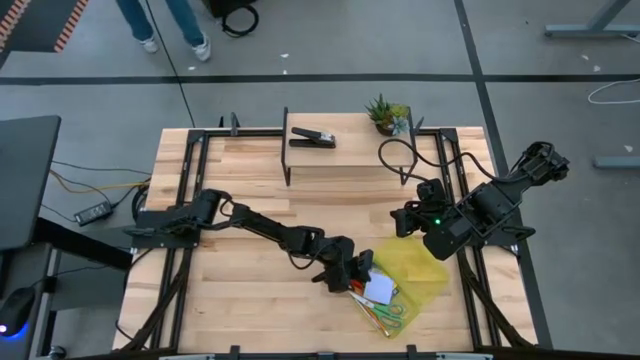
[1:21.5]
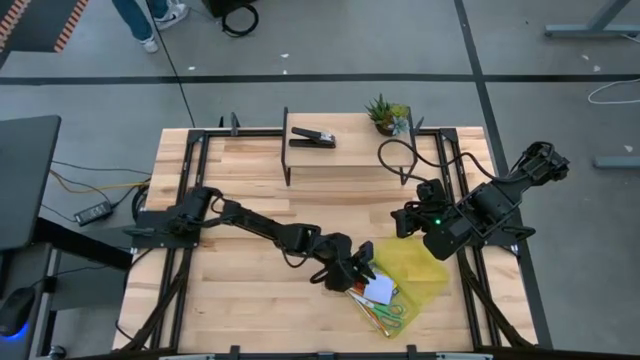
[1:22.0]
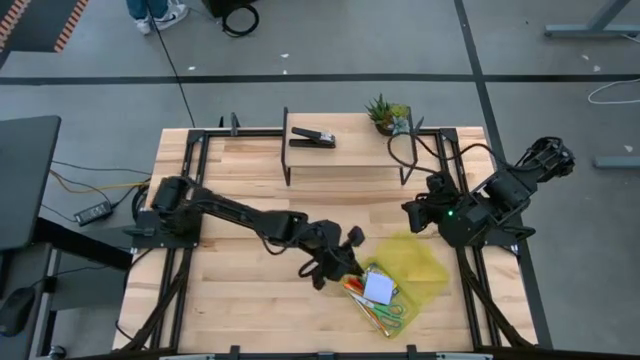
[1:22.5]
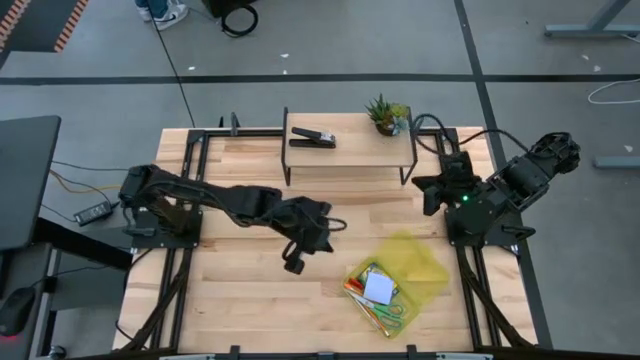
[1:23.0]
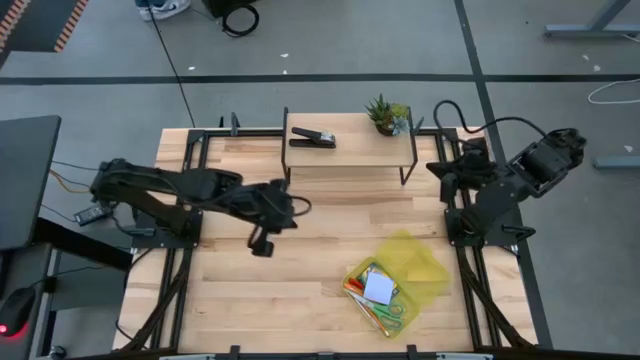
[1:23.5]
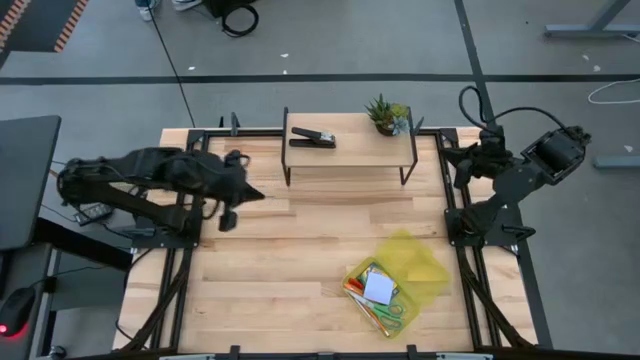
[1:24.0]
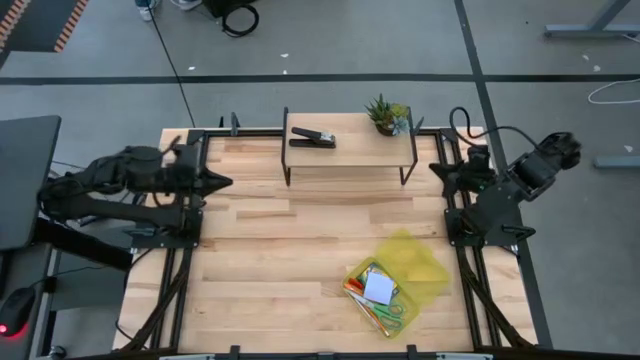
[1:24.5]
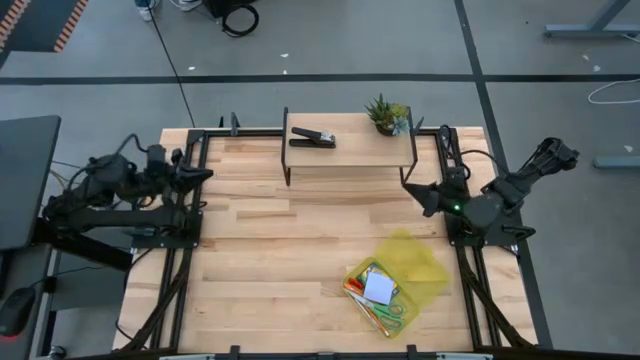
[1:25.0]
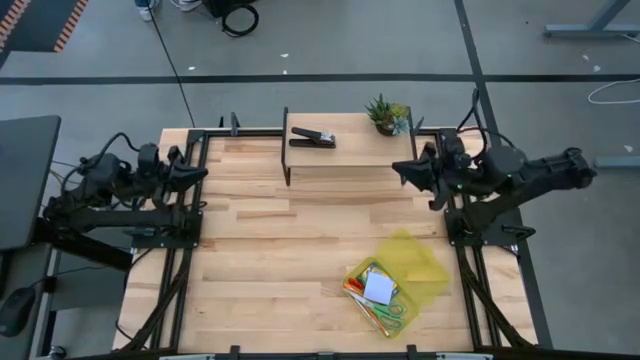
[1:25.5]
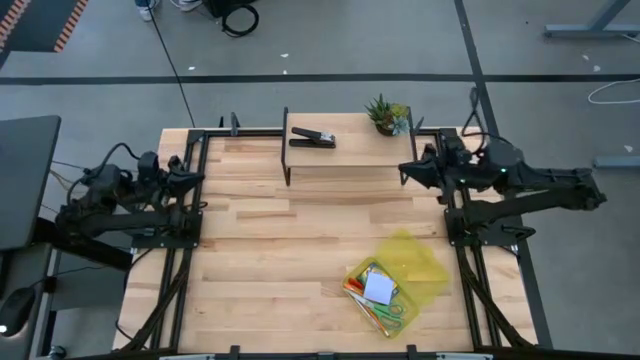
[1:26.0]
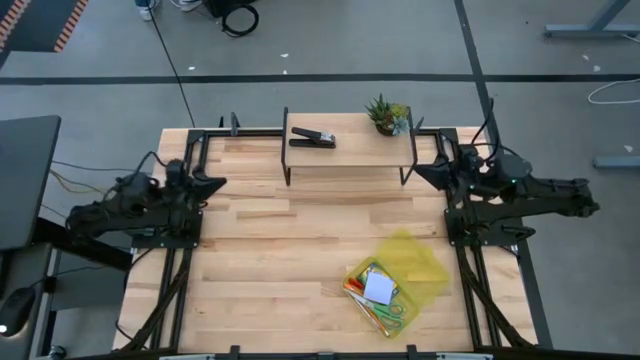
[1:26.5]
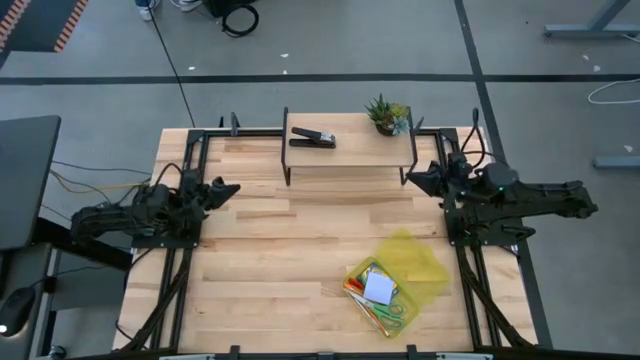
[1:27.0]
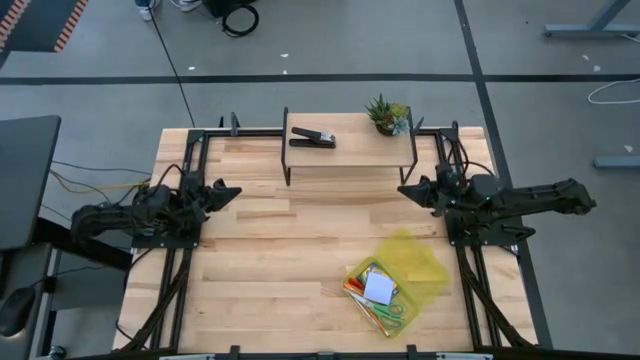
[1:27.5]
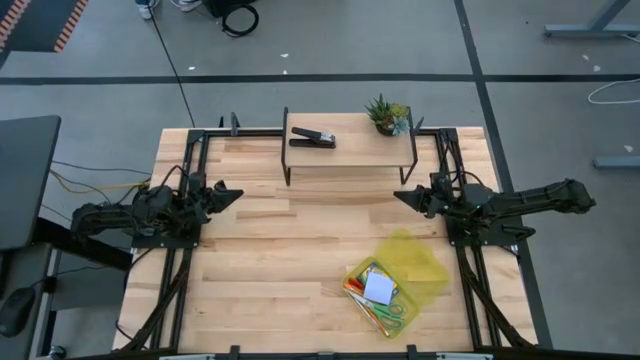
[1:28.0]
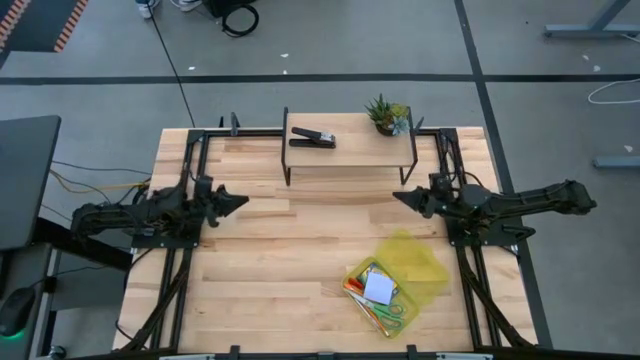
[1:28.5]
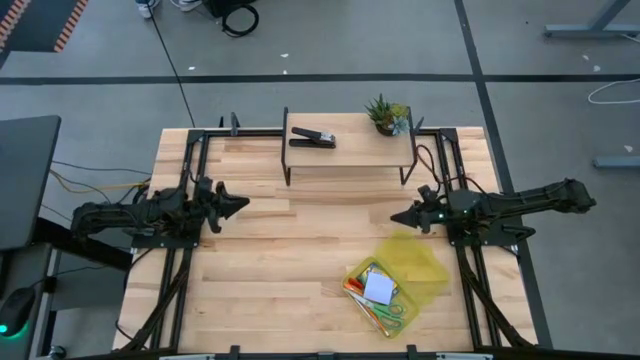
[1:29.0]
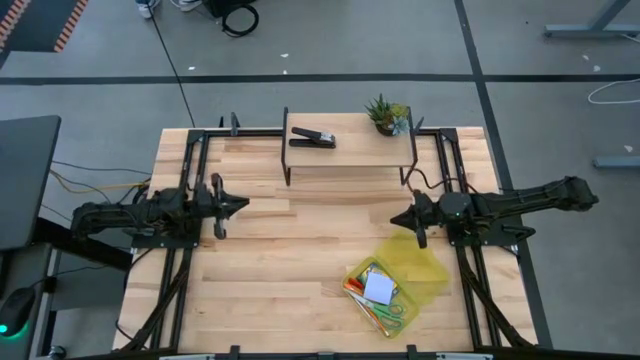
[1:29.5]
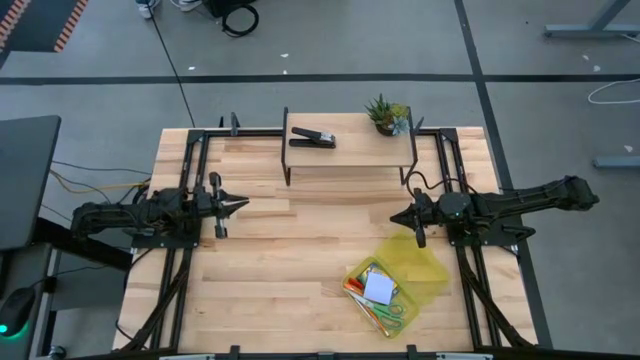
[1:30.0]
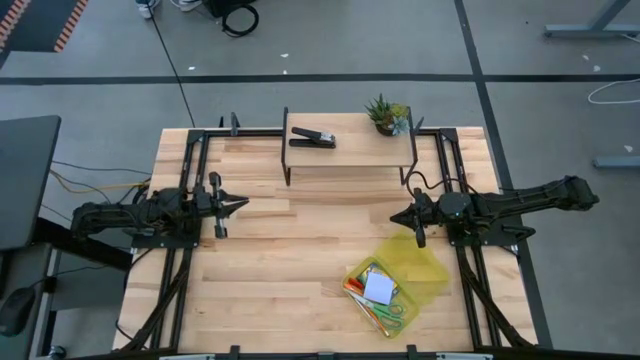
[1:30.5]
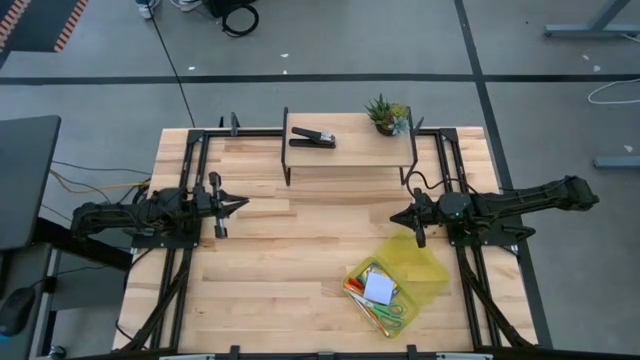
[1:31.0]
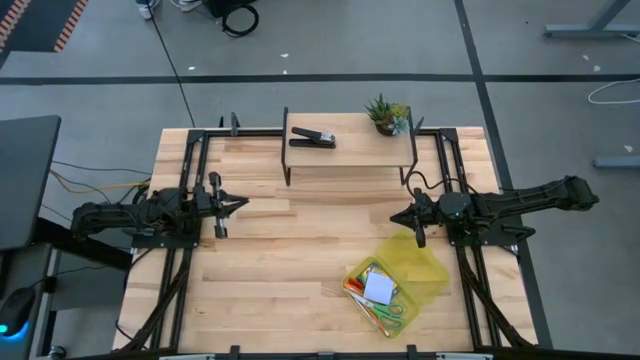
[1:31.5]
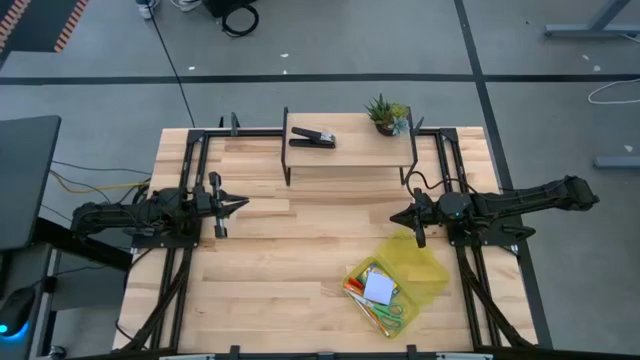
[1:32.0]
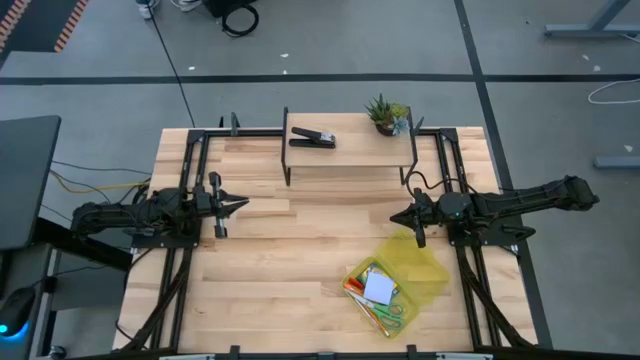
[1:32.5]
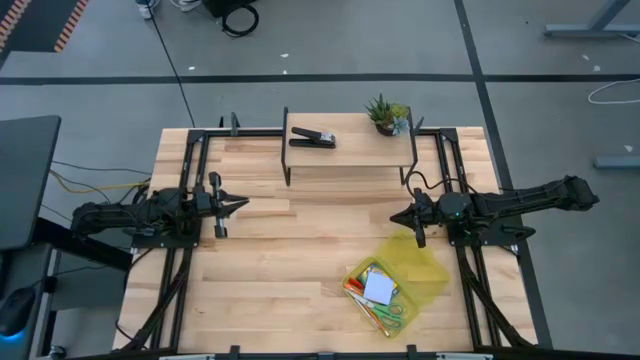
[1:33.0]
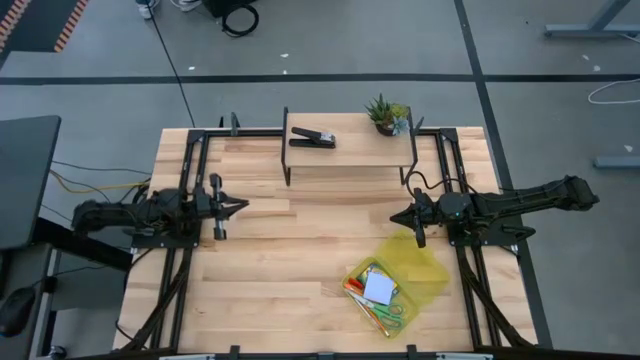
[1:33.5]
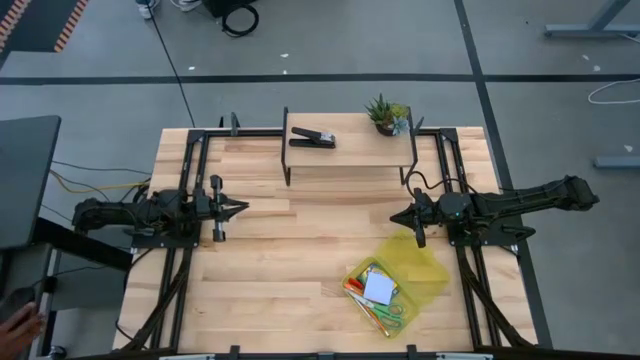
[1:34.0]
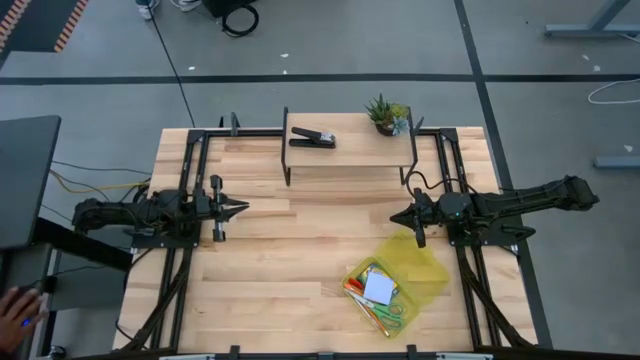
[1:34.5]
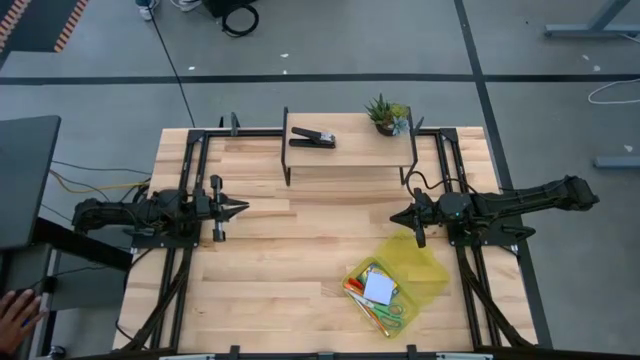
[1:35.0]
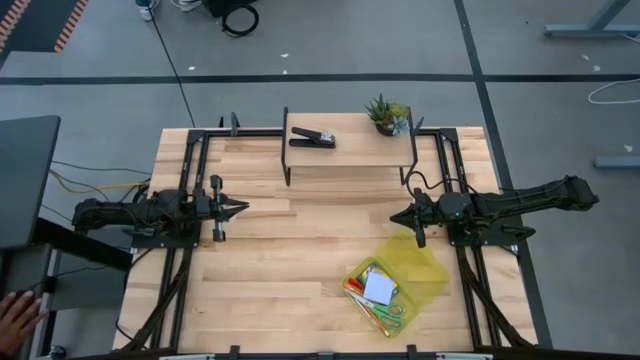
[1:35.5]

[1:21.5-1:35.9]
Task: Pack school essentials
Return to Home Position

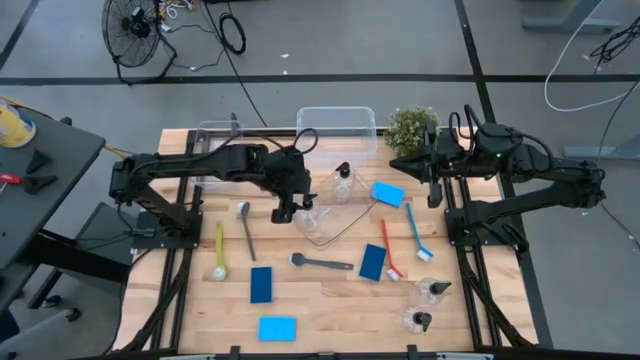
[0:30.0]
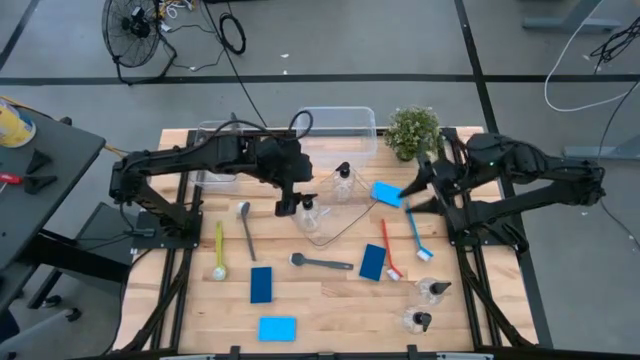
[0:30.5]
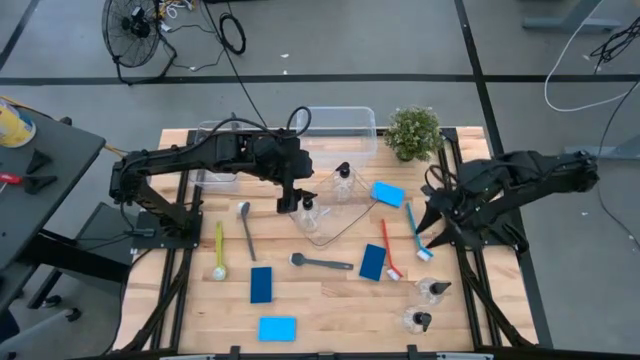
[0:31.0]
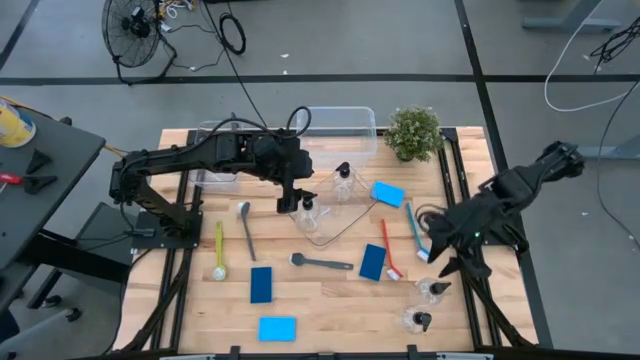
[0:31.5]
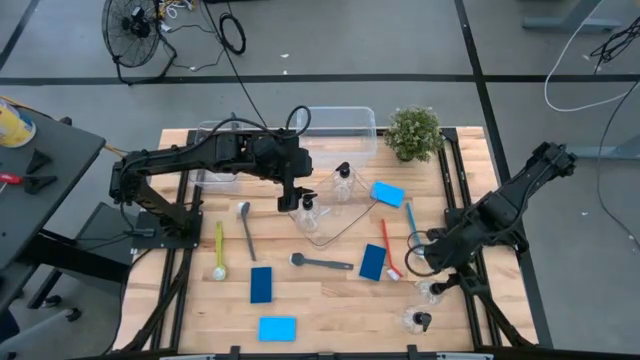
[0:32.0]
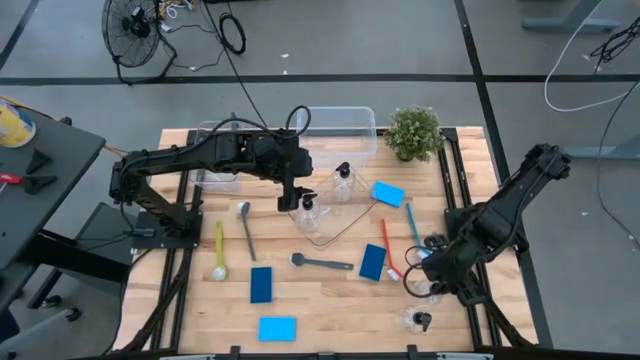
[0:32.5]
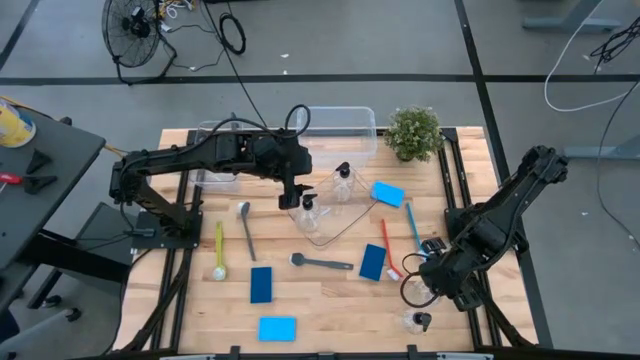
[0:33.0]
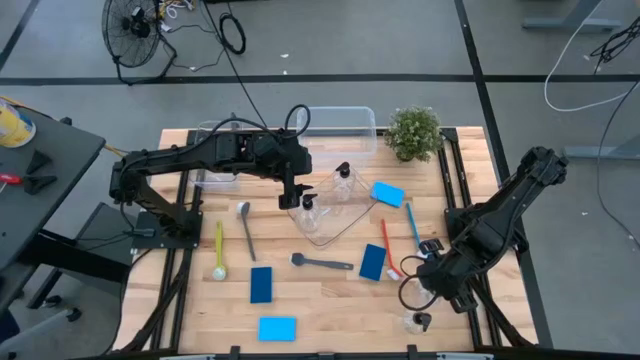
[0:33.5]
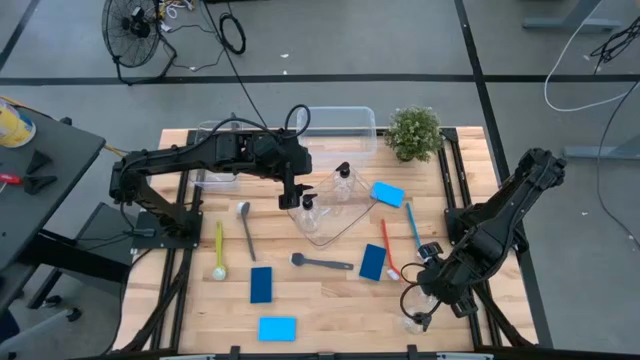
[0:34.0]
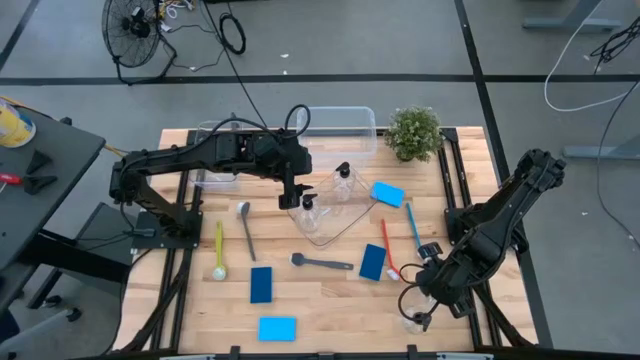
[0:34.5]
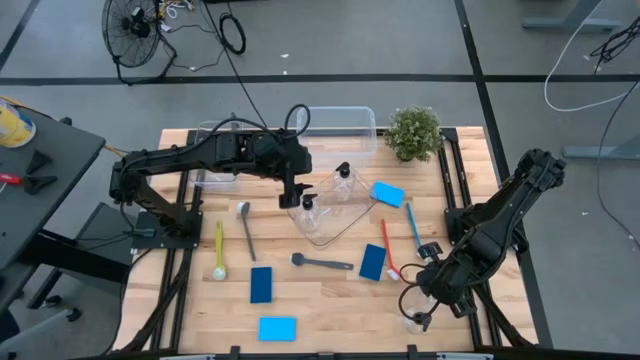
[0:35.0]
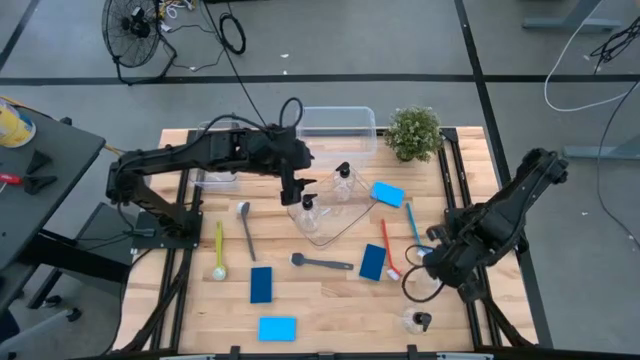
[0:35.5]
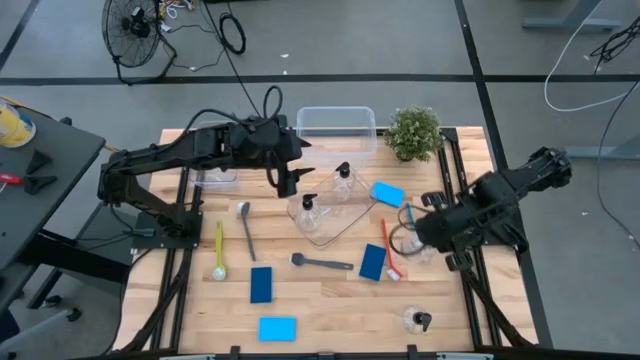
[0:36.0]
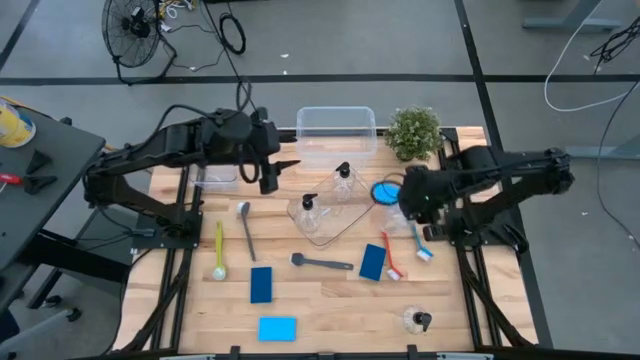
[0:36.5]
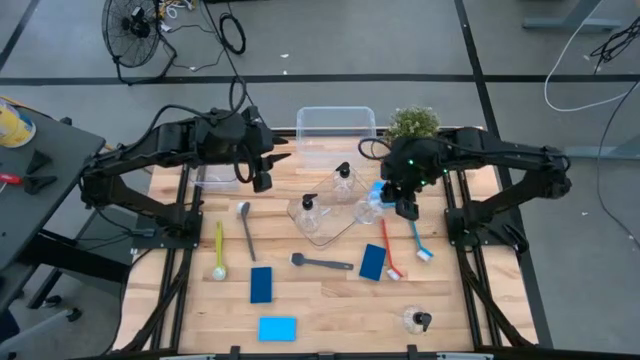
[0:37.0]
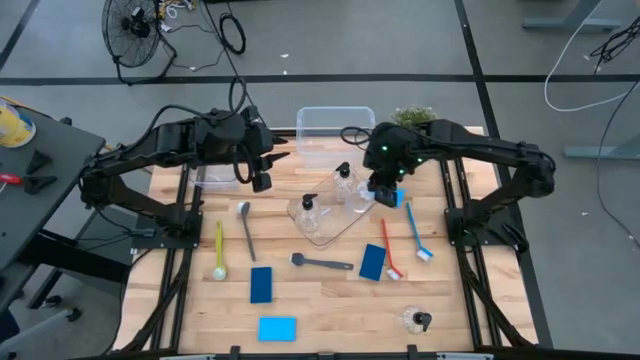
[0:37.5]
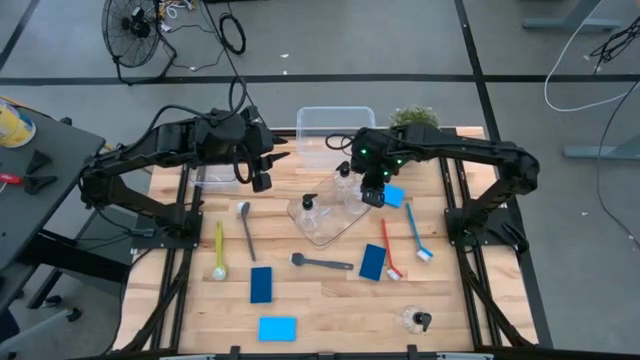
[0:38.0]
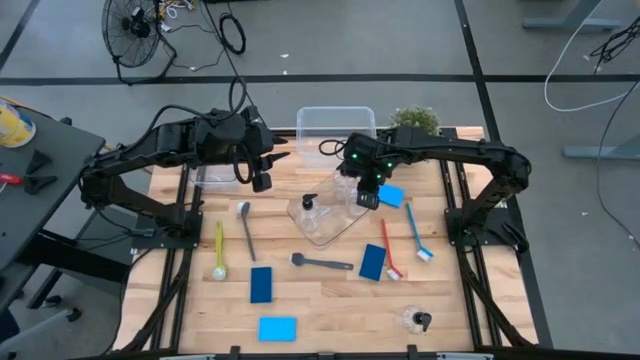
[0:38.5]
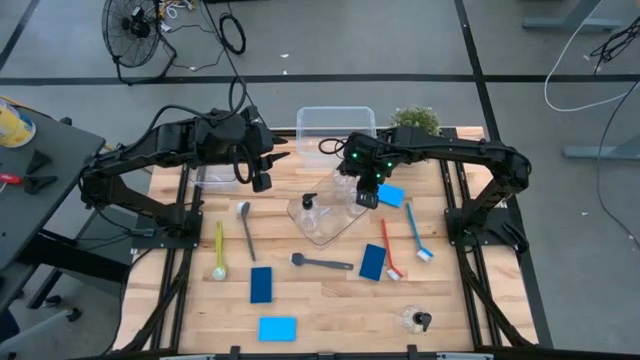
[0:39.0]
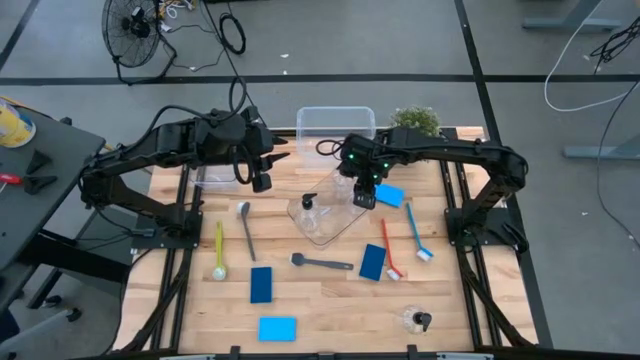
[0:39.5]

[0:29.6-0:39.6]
Task: Pick & Place Kitchen Sink Supplies
Put the dishwashing liquid dispenser into the right transparent bin
